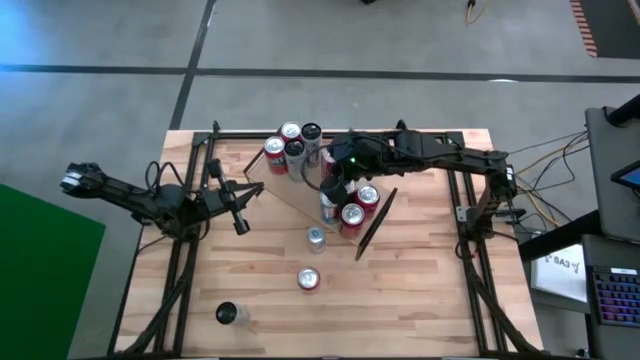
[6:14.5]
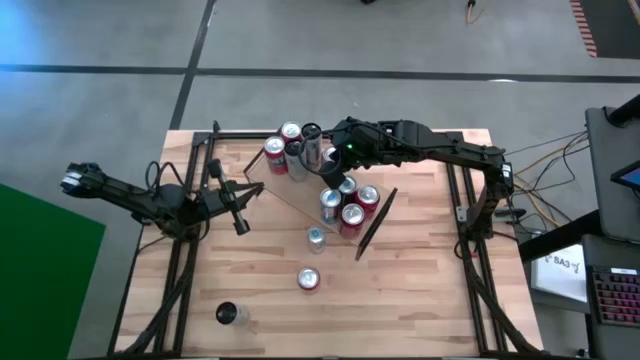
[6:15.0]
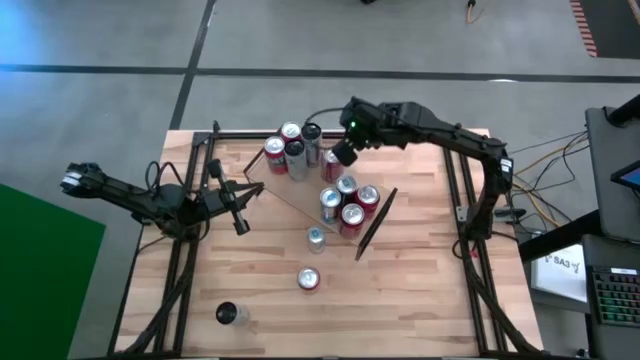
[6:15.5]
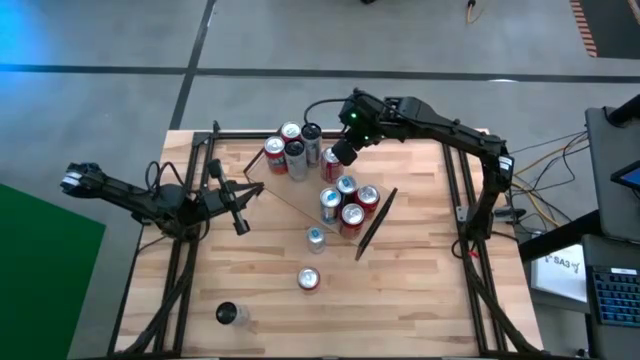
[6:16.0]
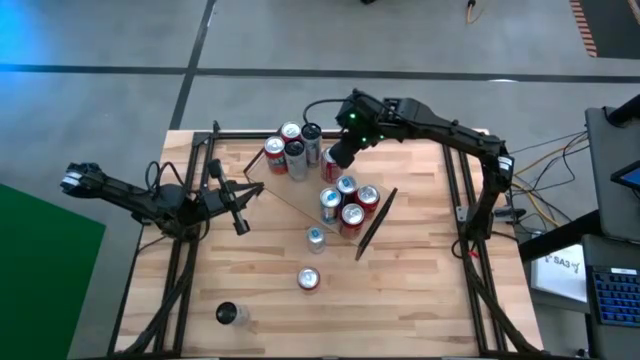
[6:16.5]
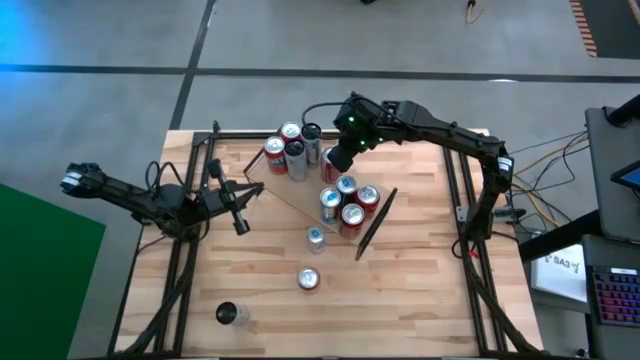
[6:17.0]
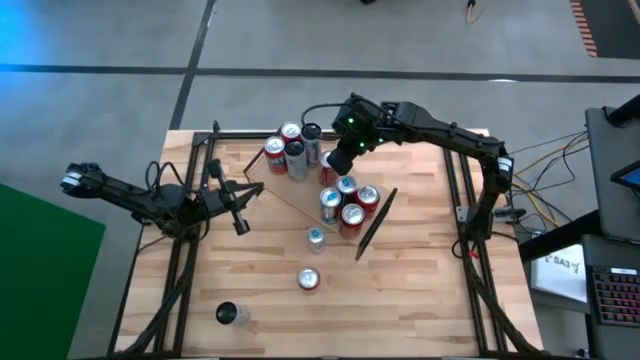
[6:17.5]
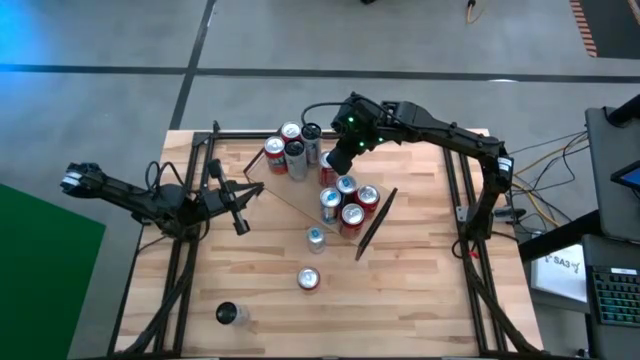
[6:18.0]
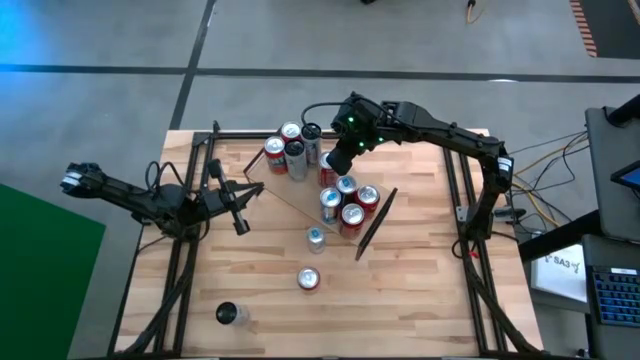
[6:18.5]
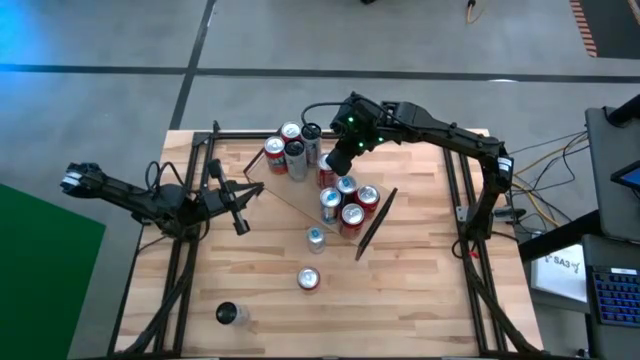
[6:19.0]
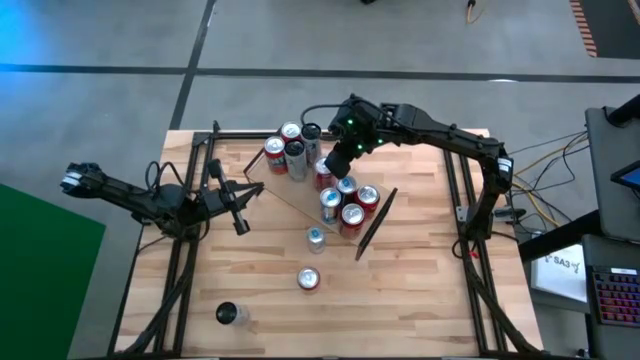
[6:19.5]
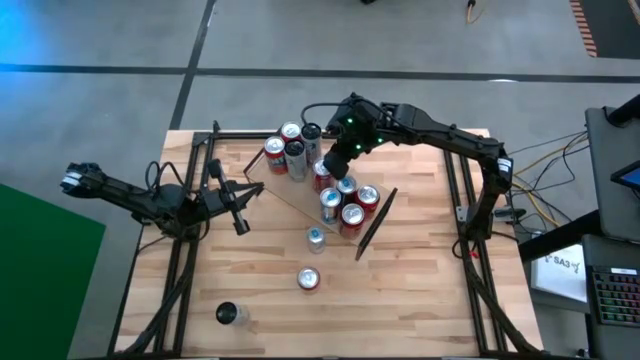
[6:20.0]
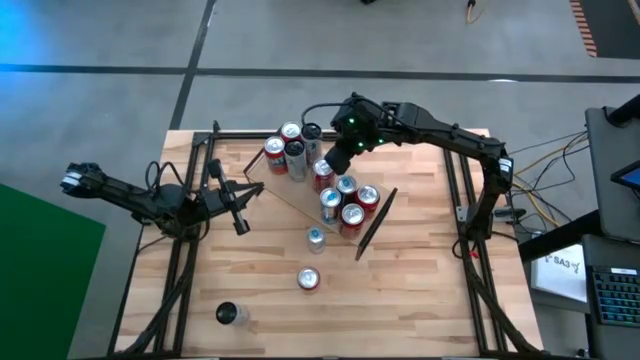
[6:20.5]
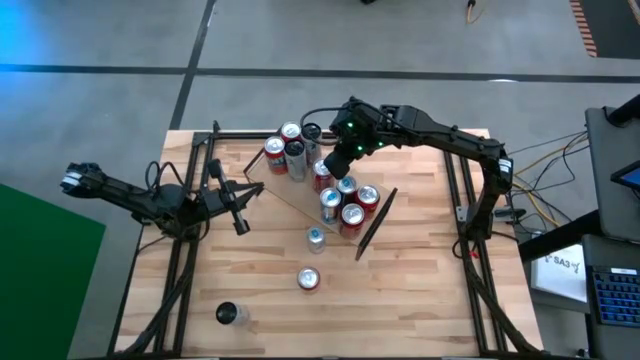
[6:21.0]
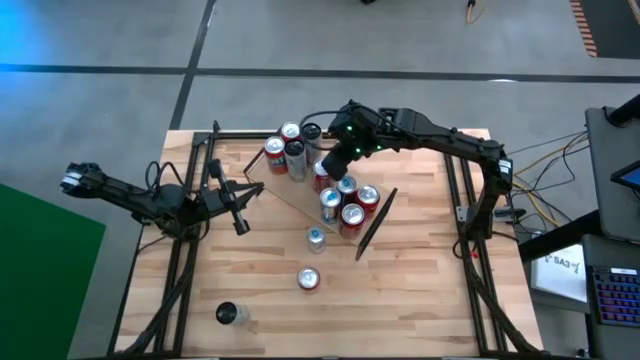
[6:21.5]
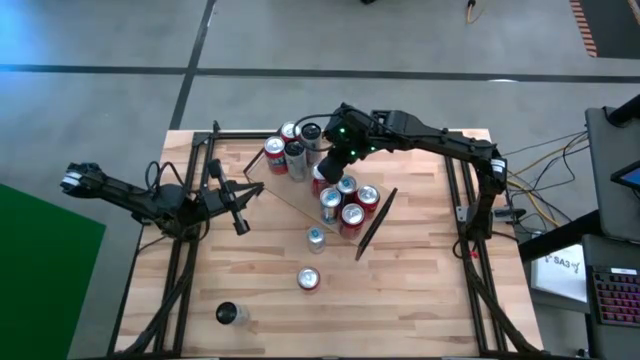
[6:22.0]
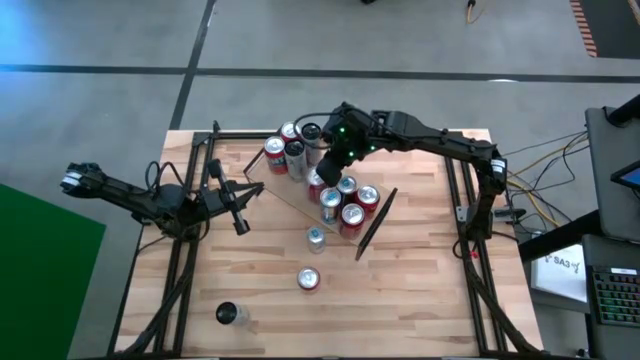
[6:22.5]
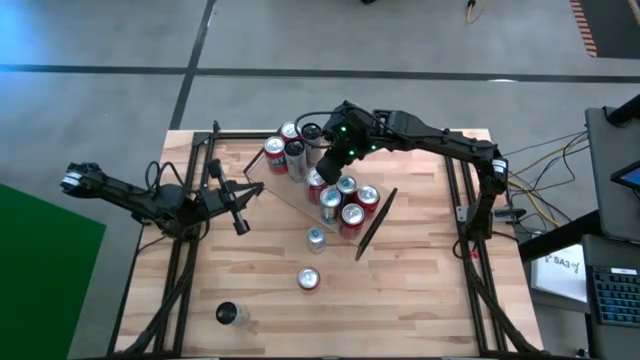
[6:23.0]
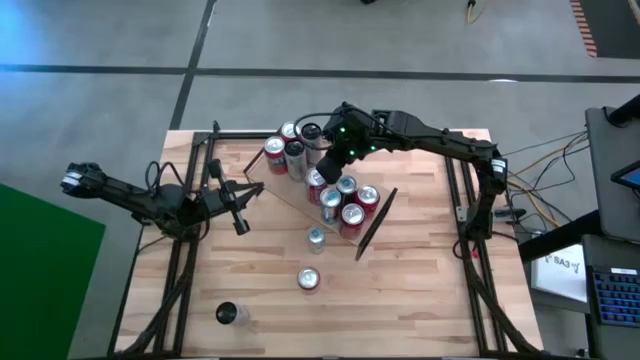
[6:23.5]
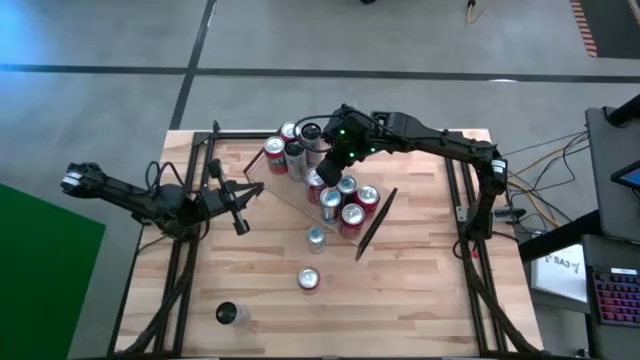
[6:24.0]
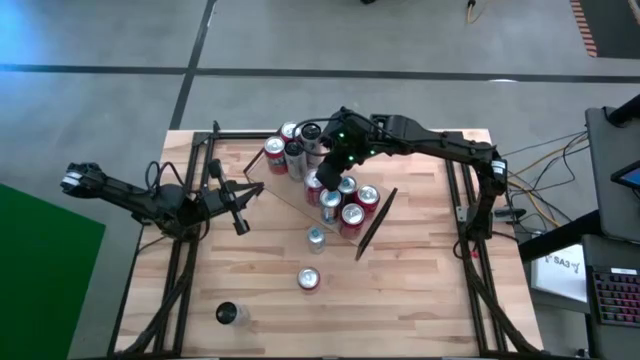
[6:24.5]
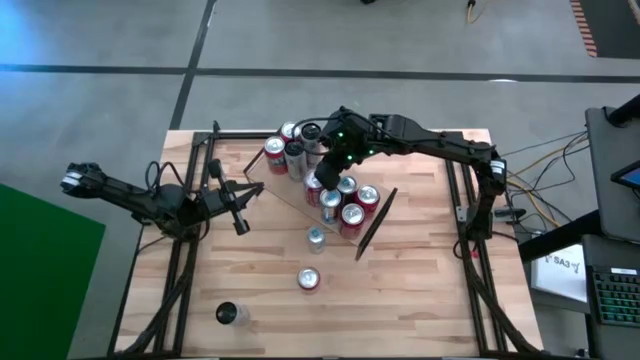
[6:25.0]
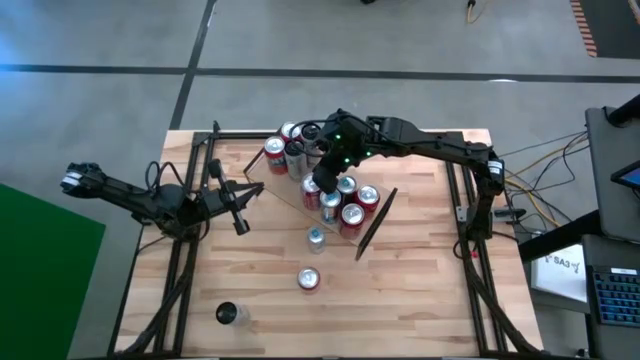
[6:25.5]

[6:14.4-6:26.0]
Task: Place canned beverage on shelf
Adjust the red/white soda can on the shelf

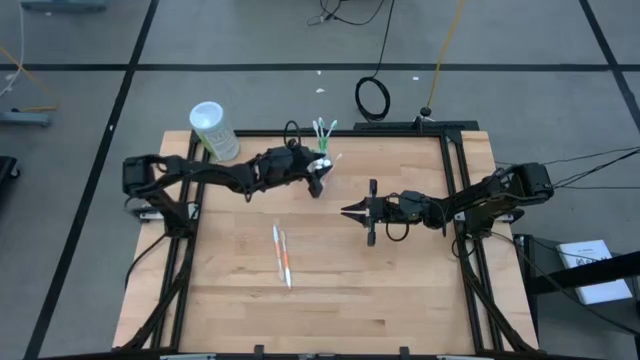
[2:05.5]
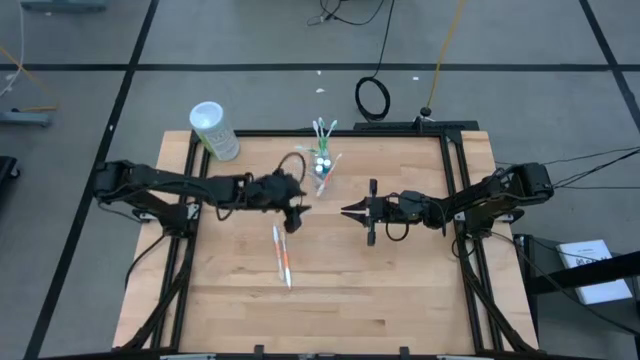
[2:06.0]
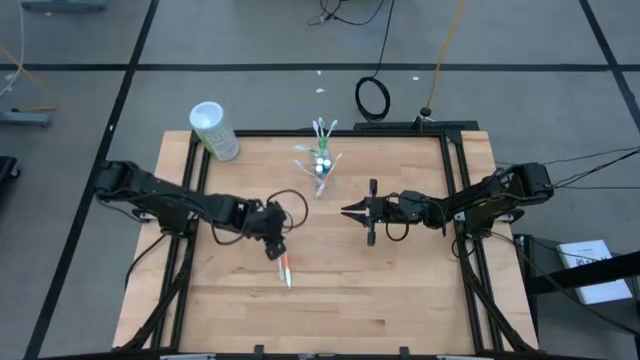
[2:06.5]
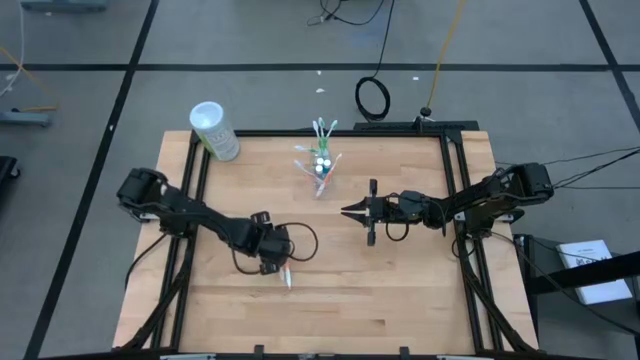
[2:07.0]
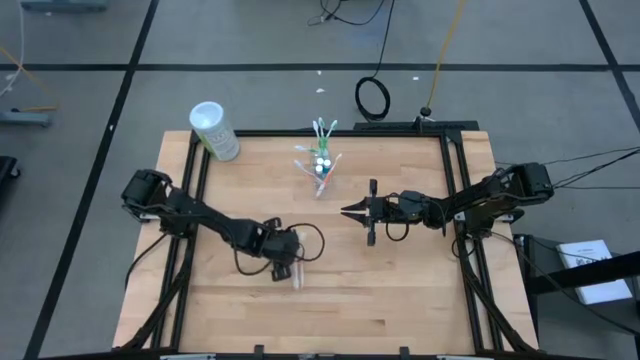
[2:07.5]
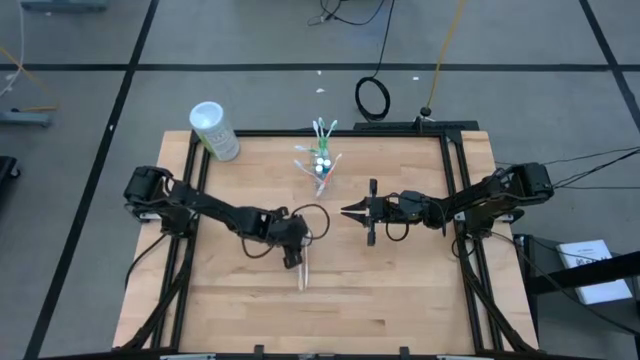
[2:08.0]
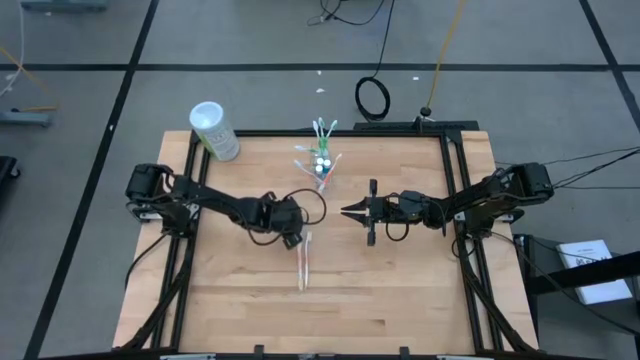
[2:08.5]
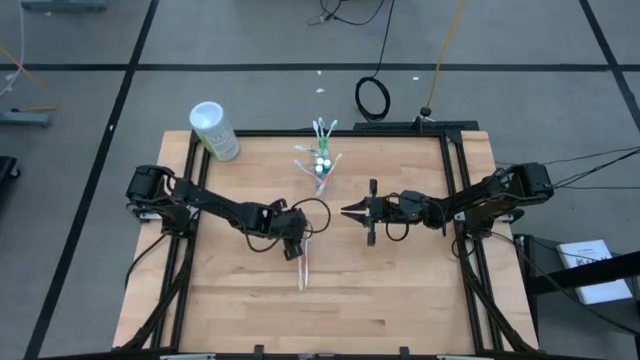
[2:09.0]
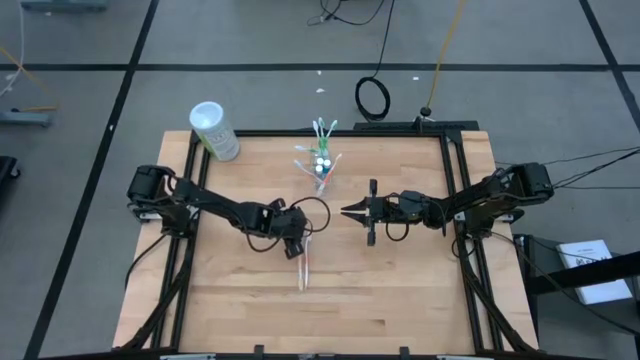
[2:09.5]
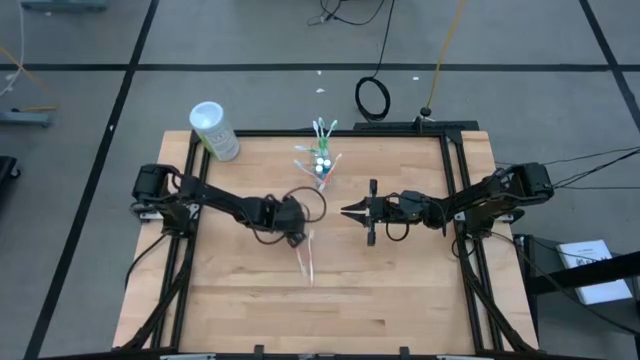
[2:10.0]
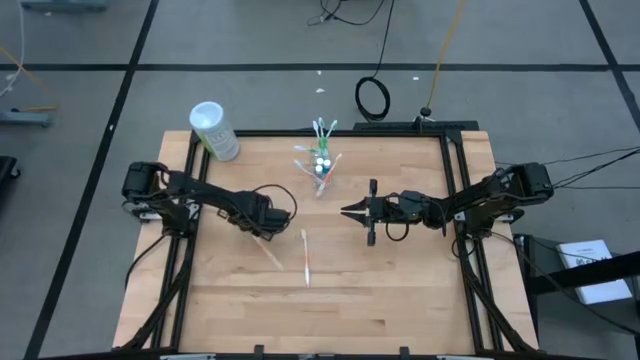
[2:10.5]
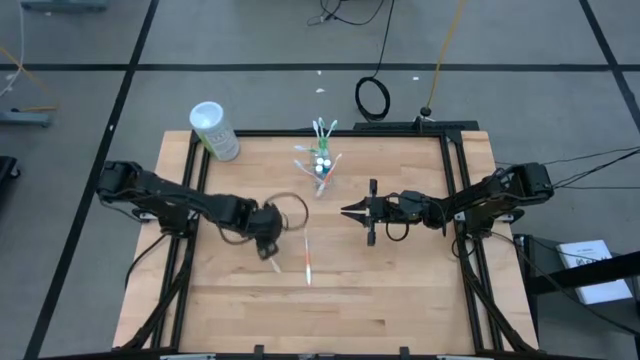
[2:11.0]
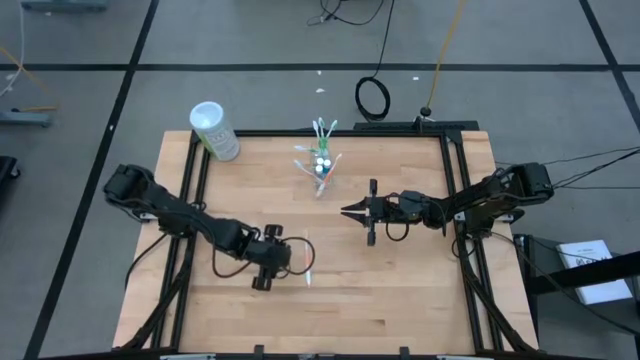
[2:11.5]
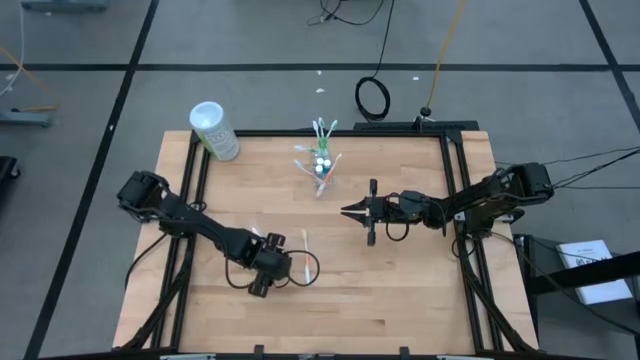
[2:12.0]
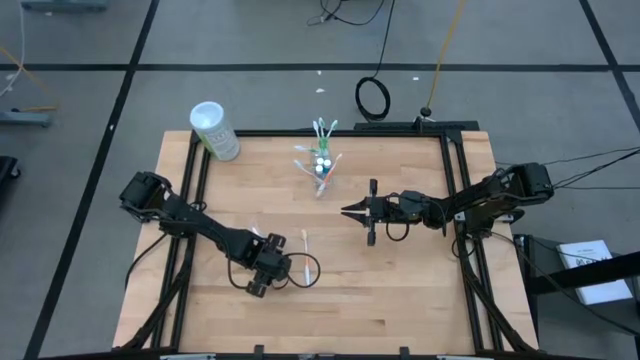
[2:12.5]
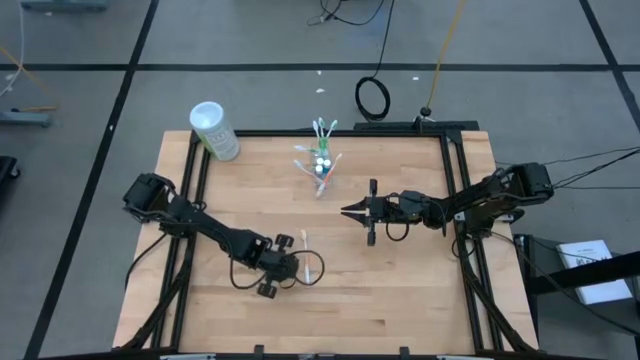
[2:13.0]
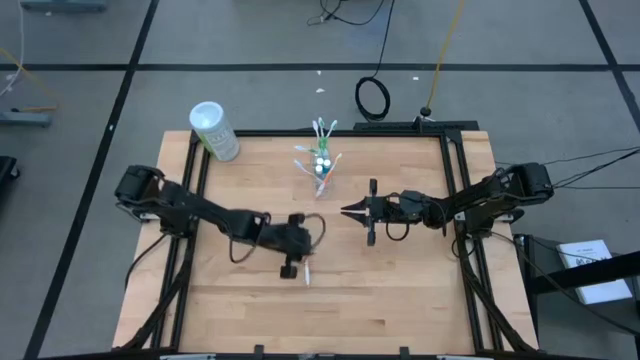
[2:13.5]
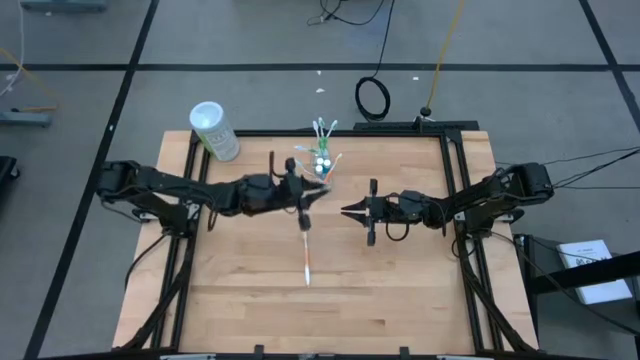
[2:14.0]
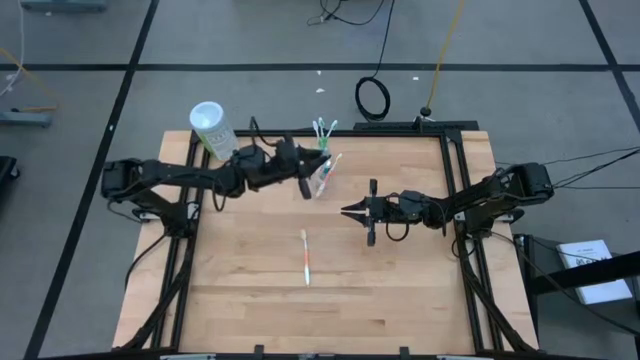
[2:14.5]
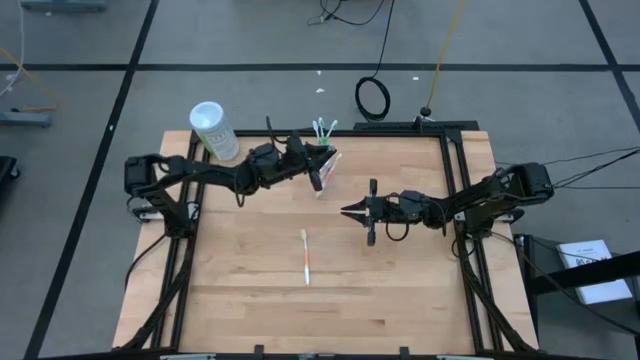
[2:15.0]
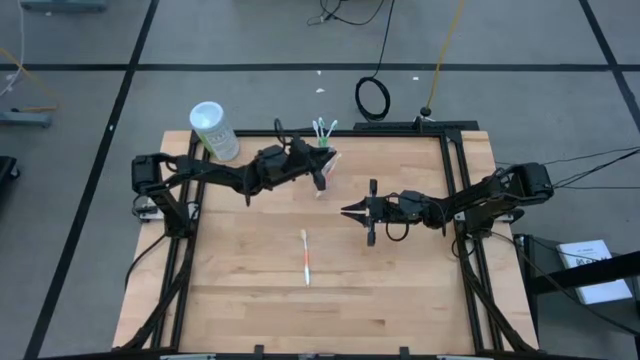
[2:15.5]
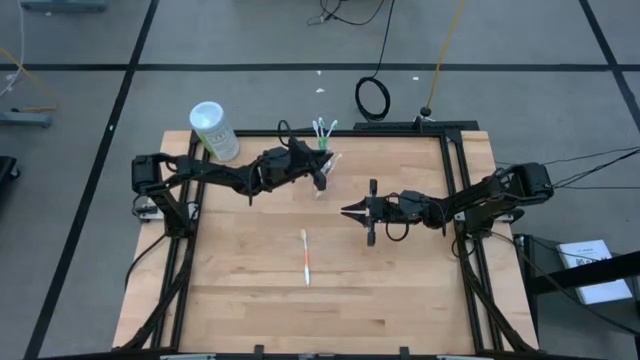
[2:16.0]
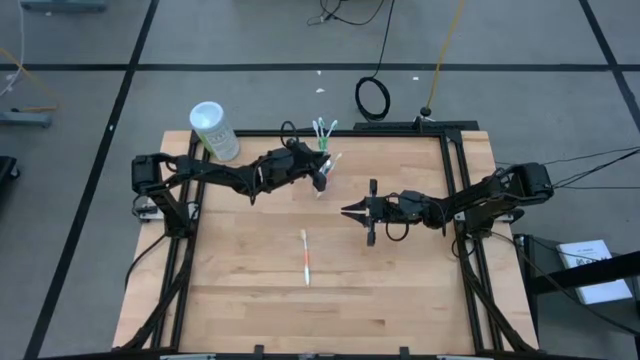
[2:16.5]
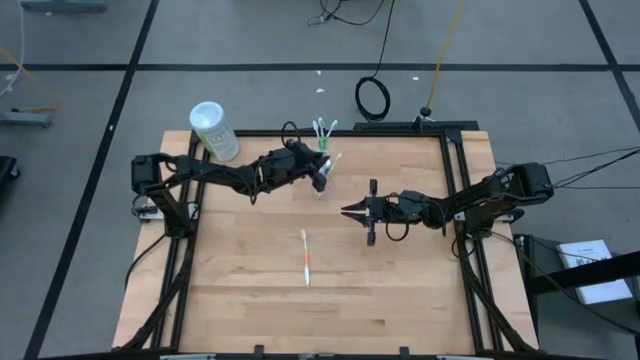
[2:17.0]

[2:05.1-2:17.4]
Task: Pick & Place toothbrushing station
Put the orange toothbrush into the transparent organizer
